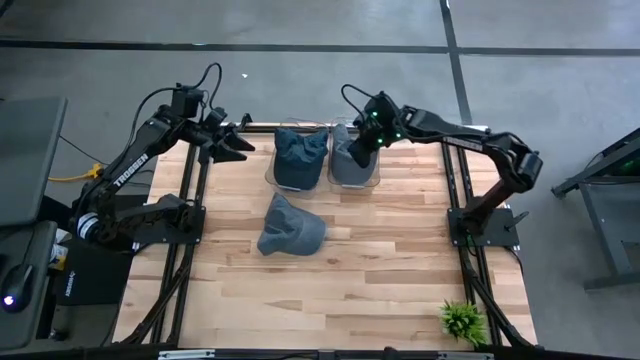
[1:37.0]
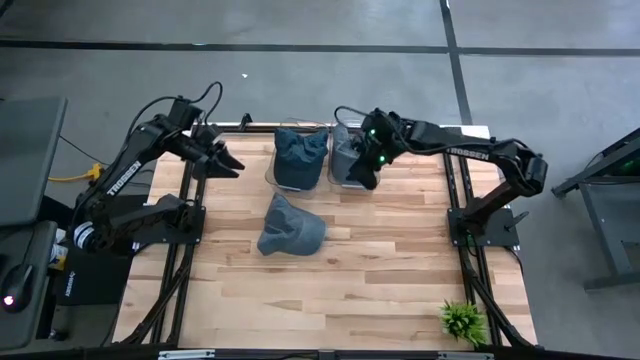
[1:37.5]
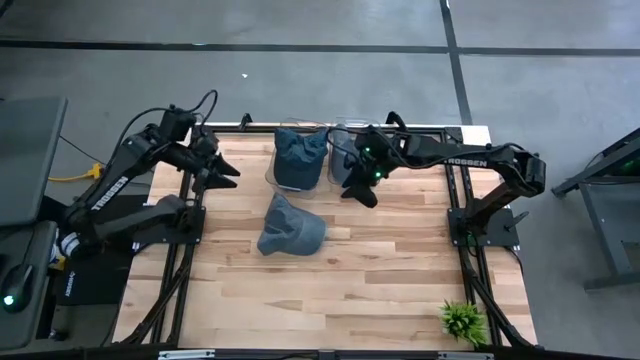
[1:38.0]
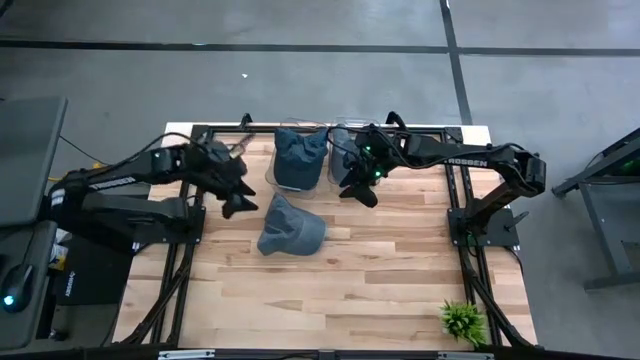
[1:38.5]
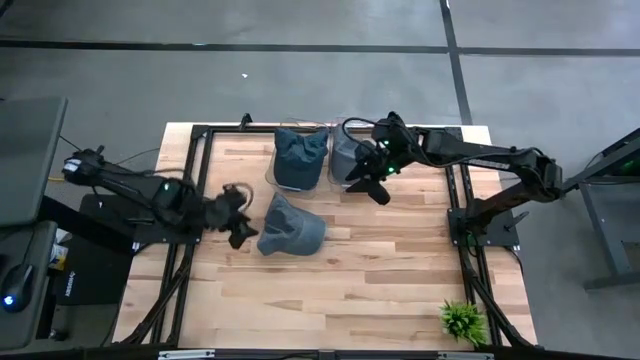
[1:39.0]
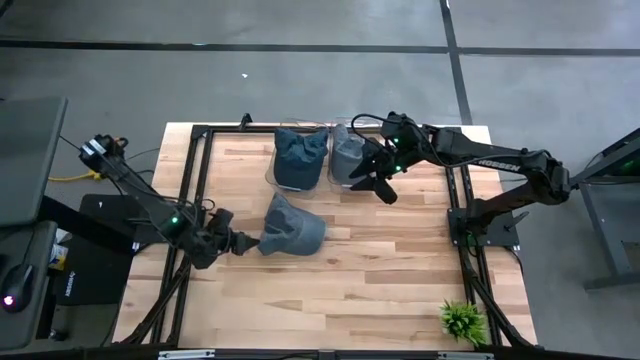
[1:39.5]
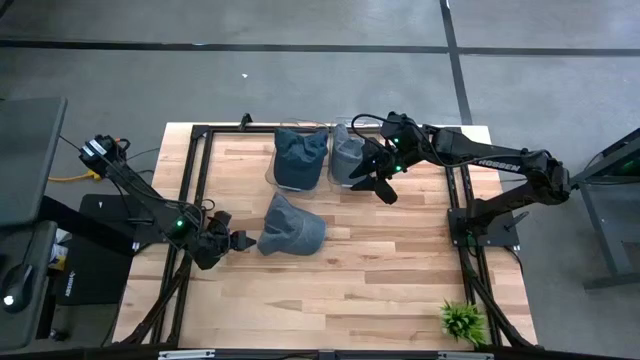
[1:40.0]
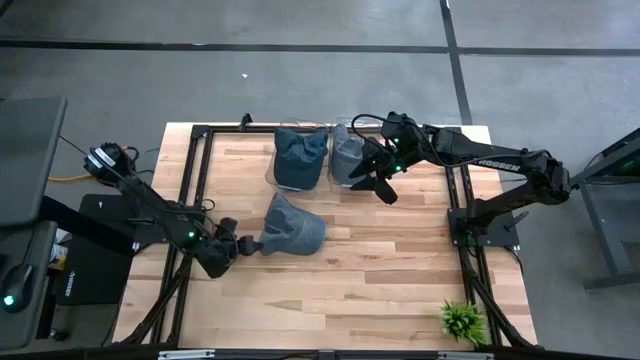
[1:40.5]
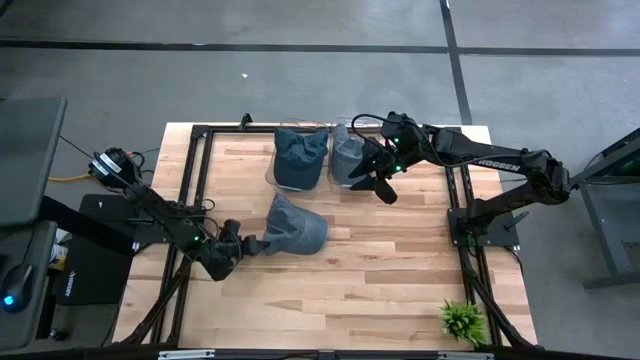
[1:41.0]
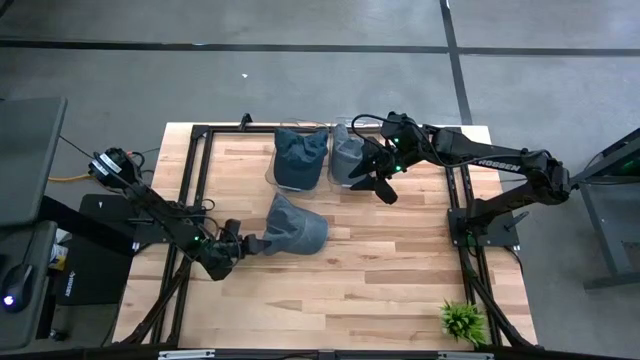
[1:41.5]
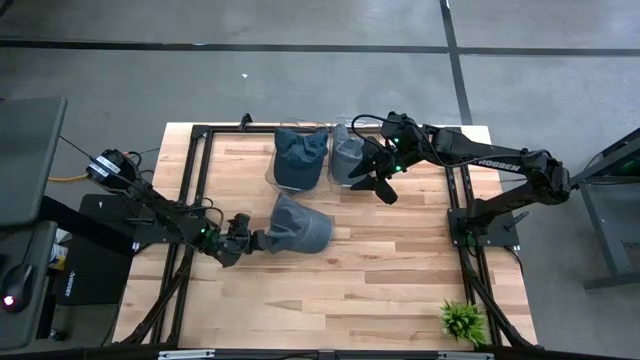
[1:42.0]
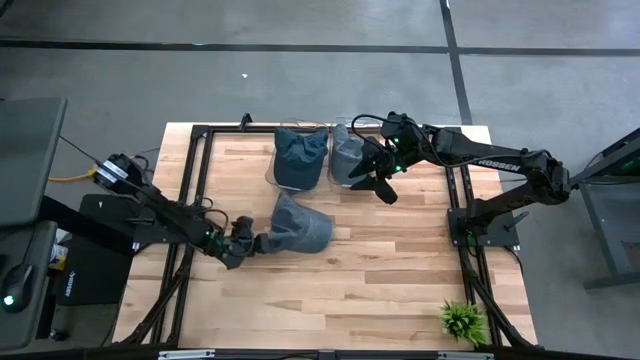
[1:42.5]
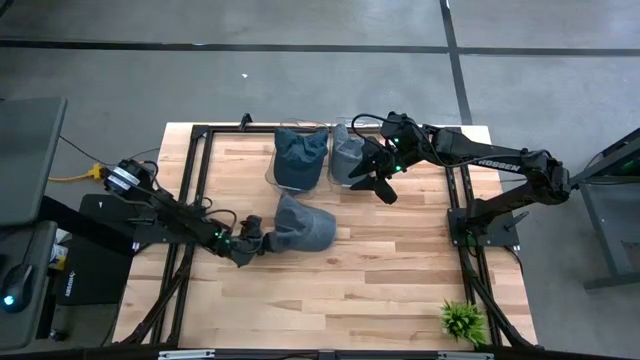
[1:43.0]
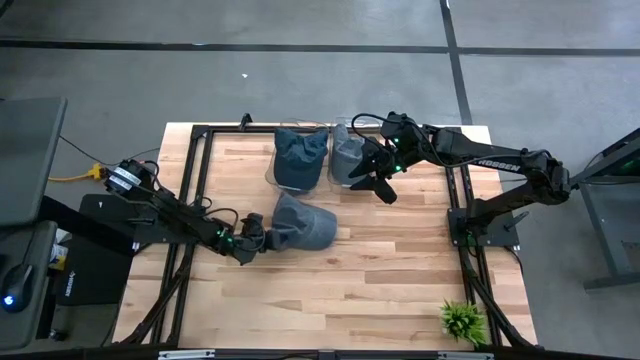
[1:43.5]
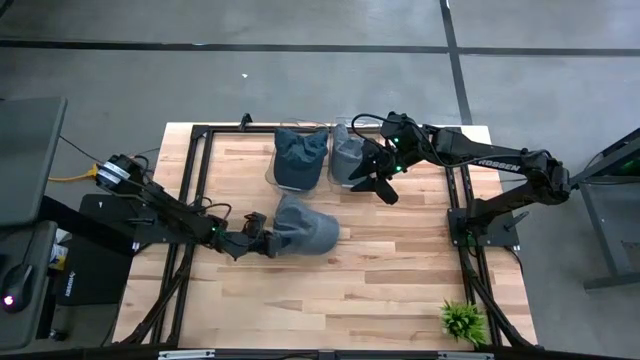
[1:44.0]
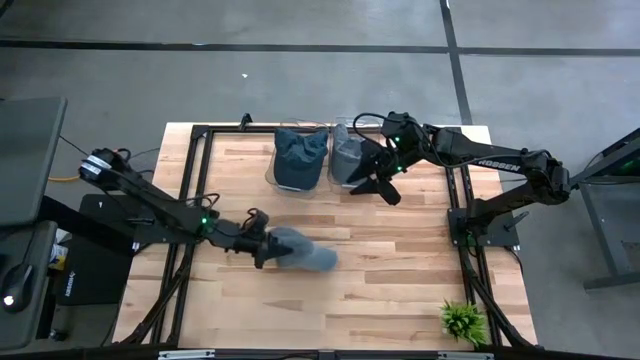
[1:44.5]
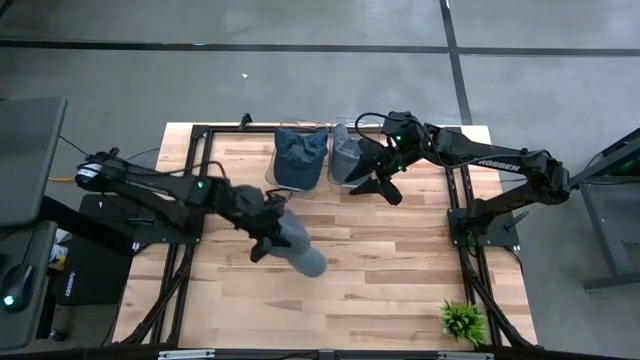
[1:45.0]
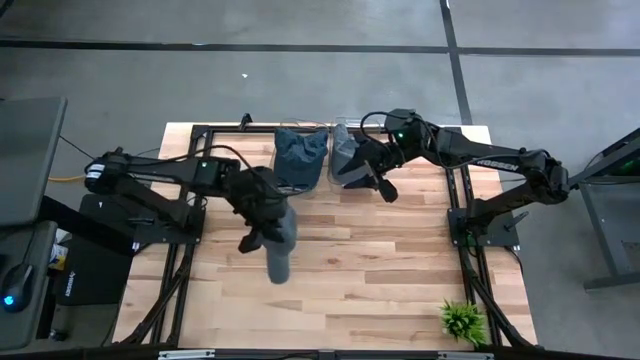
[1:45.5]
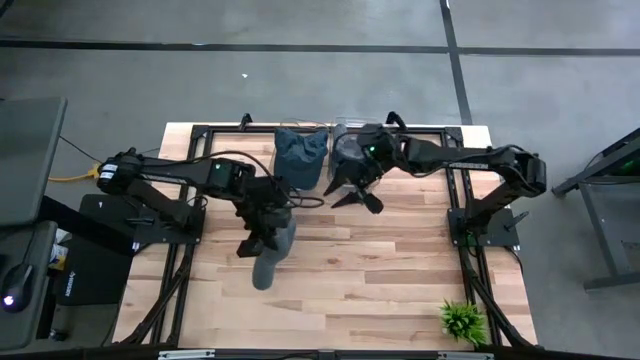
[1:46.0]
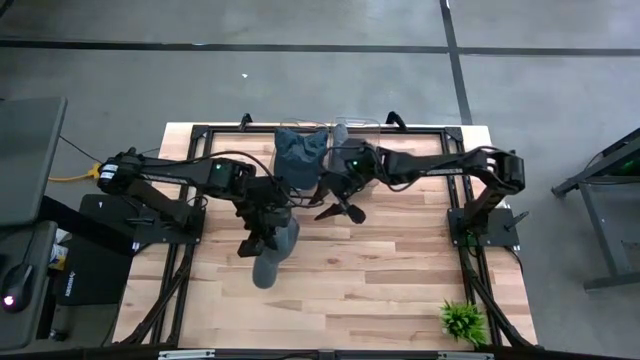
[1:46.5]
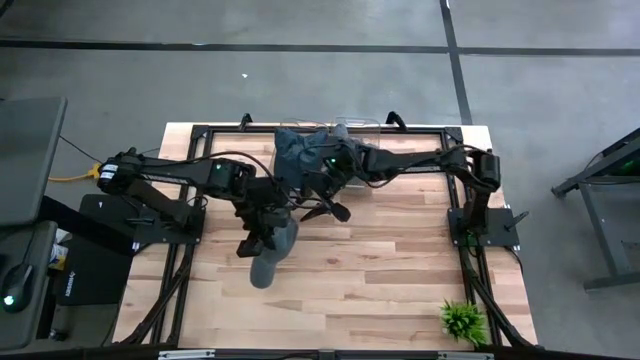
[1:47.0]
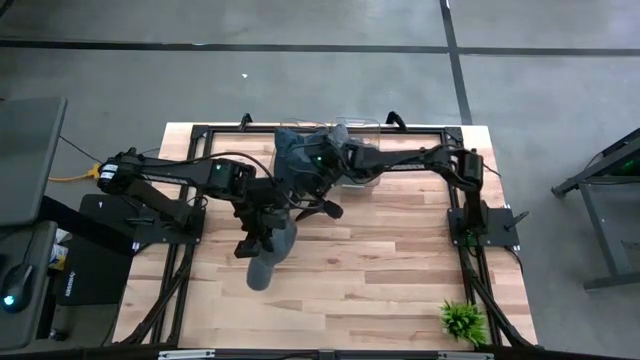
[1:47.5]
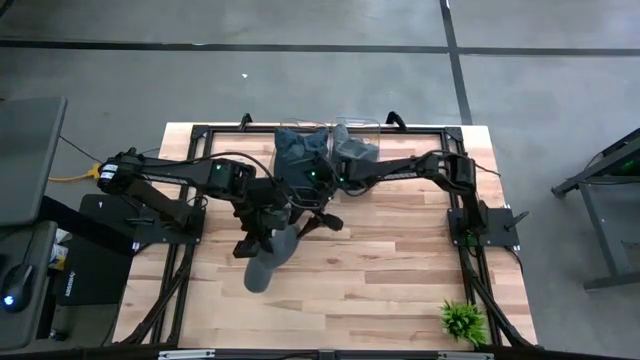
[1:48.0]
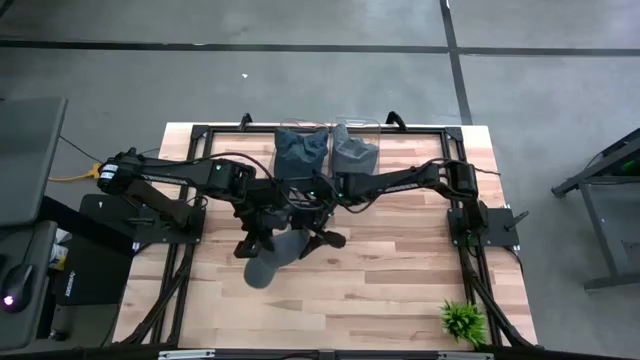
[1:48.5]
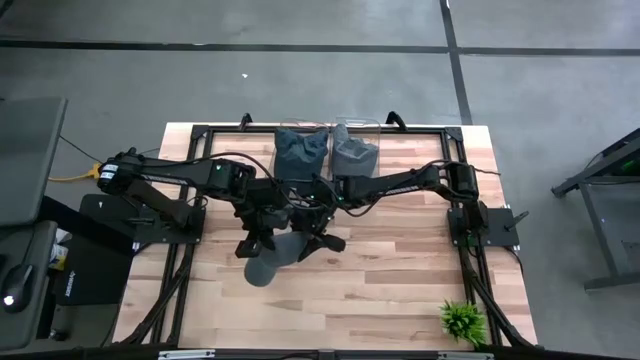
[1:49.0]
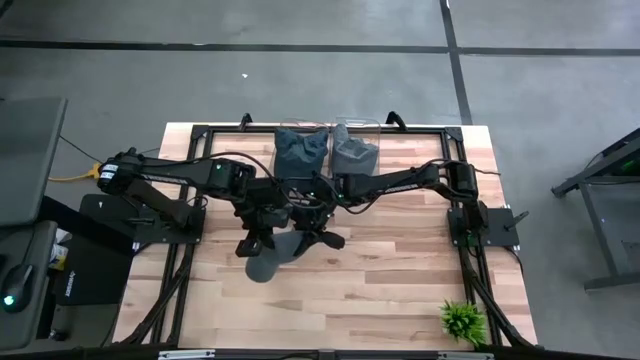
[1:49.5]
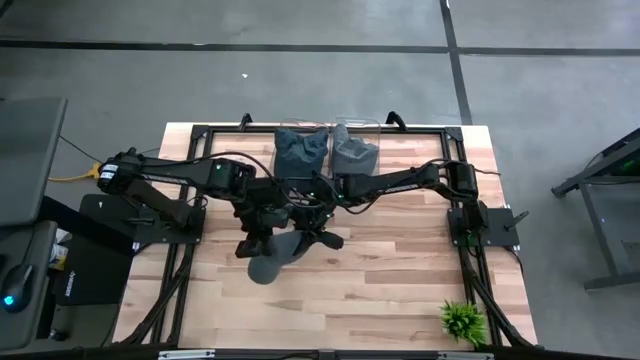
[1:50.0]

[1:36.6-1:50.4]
Task: Pick & Place hat
Put the gray cap into the right transparent bin

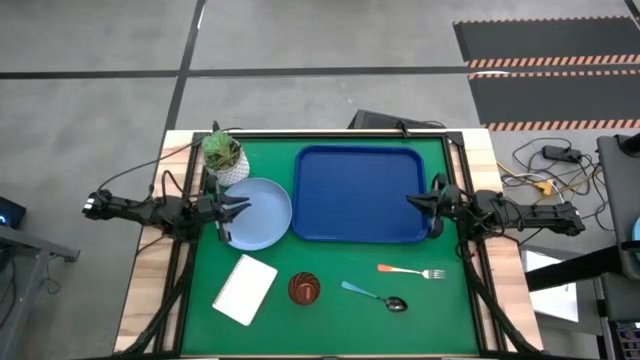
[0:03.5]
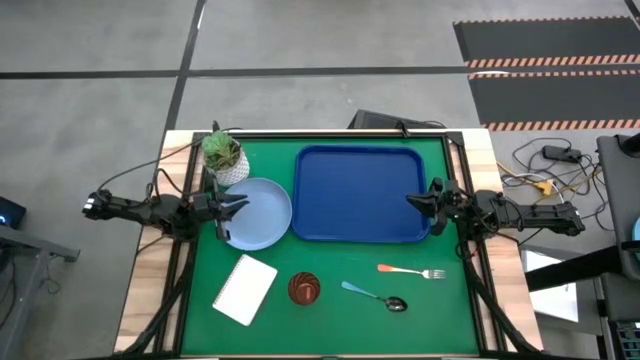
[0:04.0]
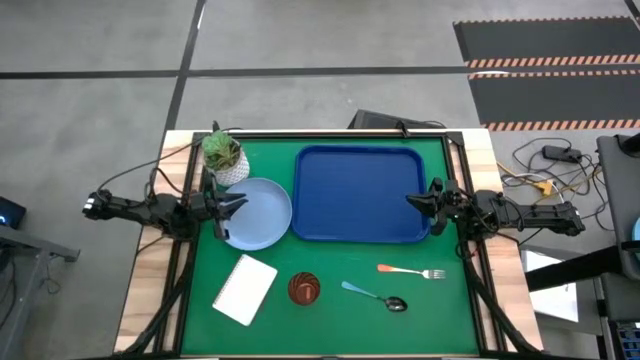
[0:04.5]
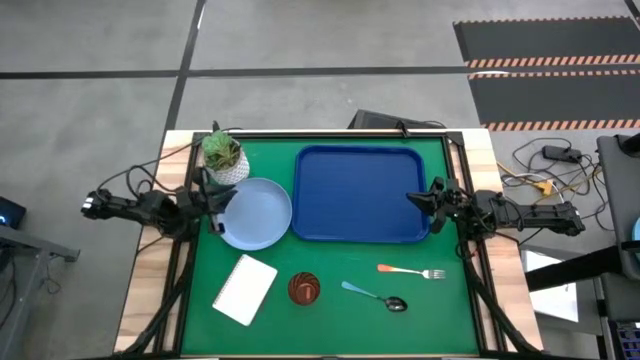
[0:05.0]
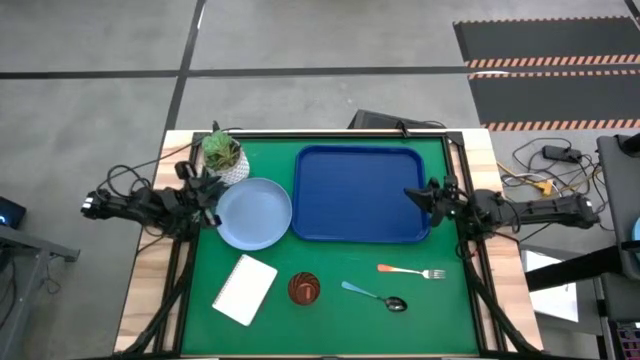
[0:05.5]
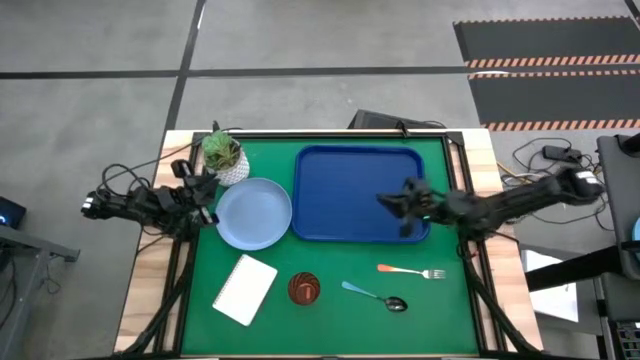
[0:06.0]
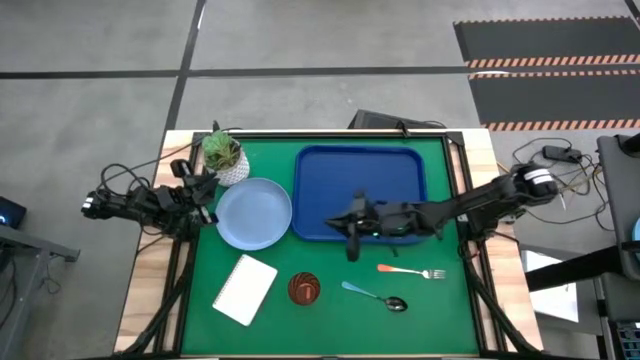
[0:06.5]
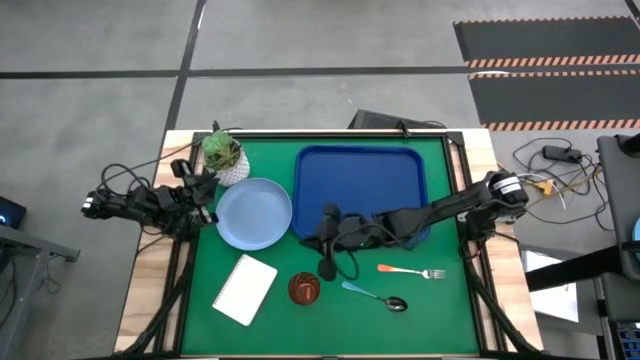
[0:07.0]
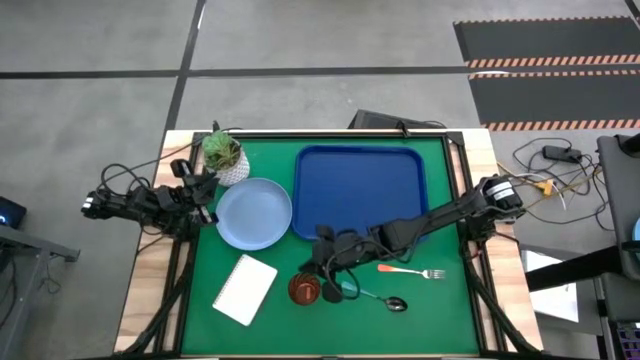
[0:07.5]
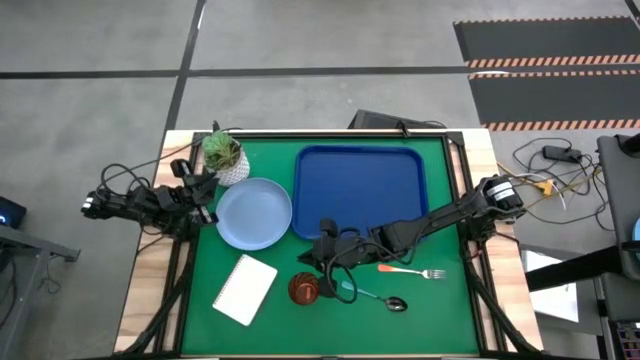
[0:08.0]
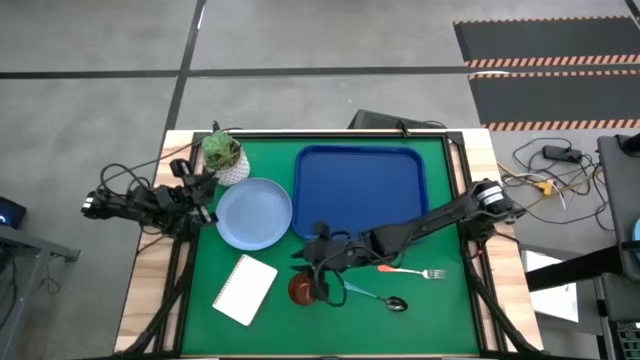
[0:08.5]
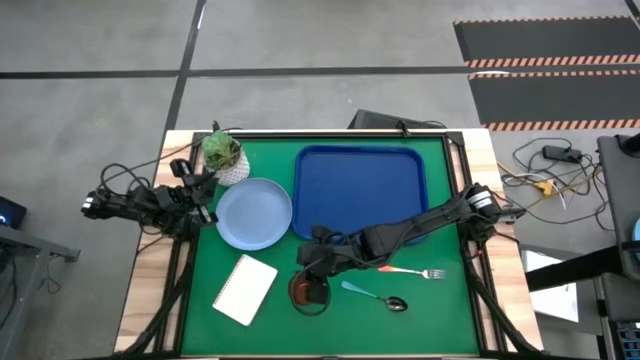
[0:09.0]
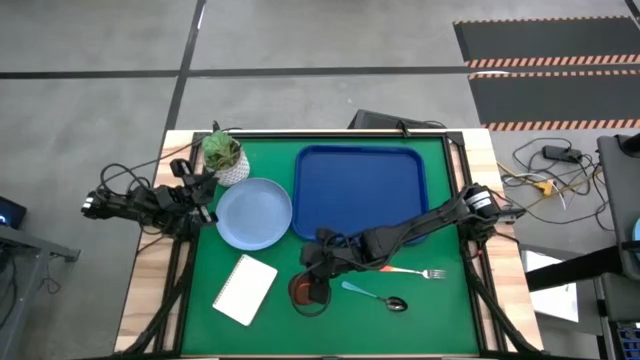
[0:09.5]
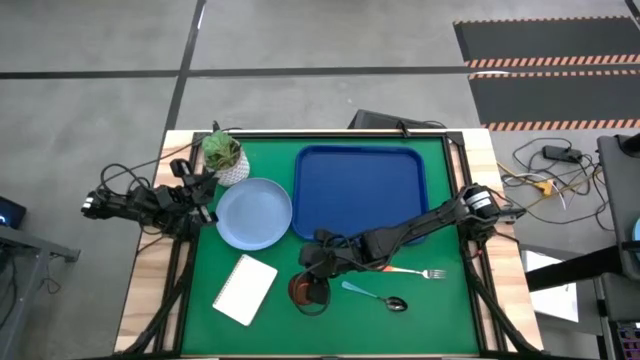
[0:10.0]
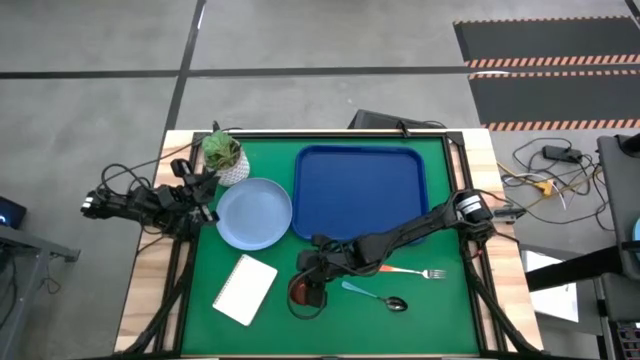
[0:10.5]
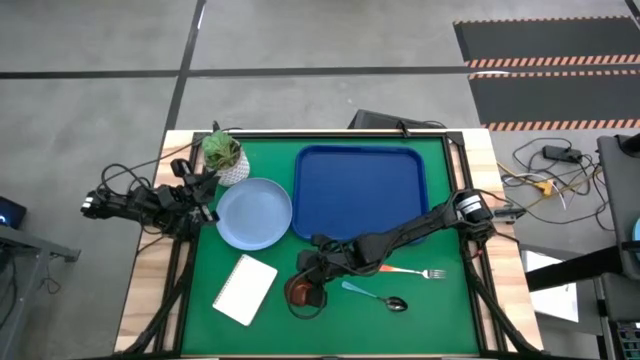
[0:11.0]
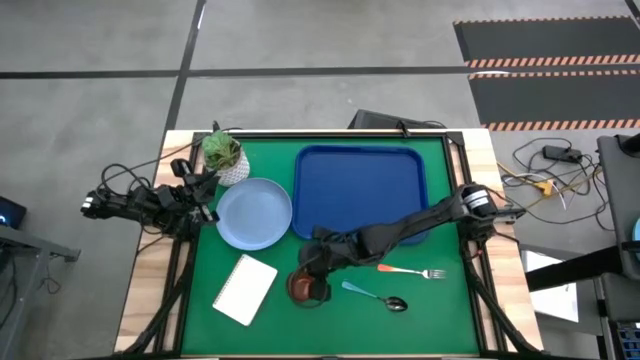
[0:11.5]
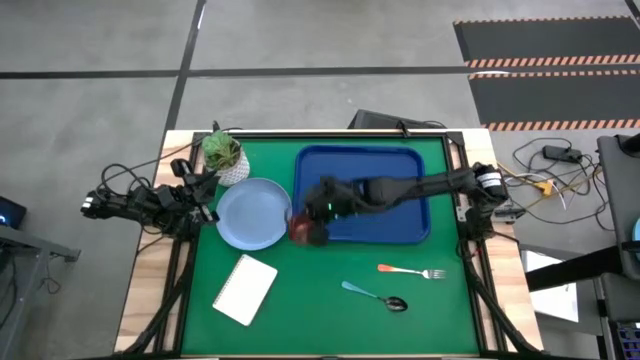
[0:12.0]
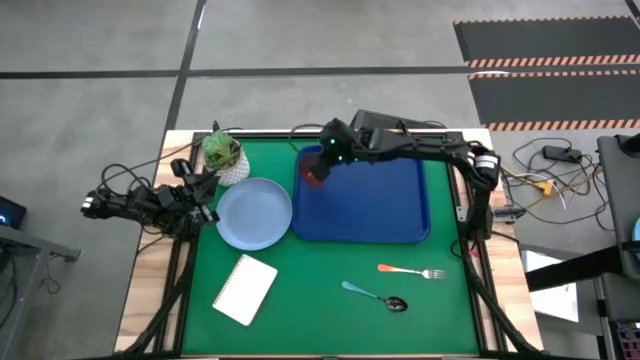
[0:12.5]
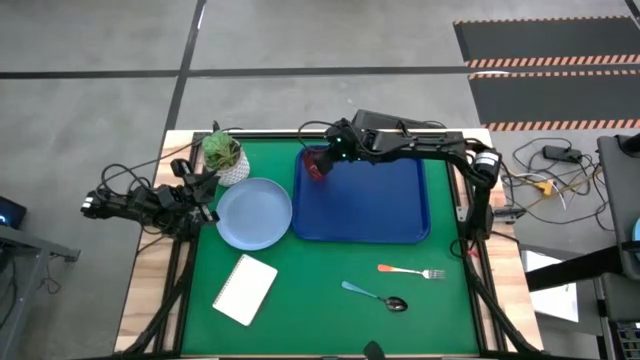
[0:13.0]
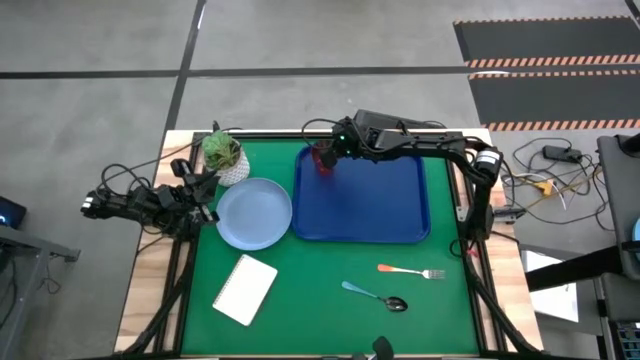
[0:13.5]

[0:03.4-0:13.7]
Task: Pick and place plate/cup/fork/spoon on tray
Put the orange glass cup on the blue tray
